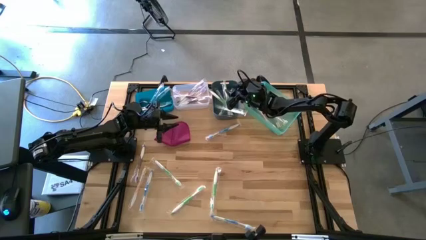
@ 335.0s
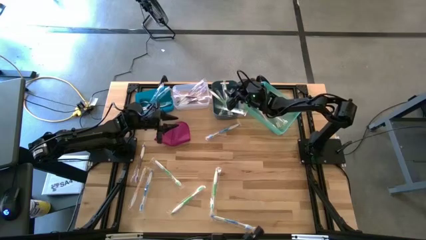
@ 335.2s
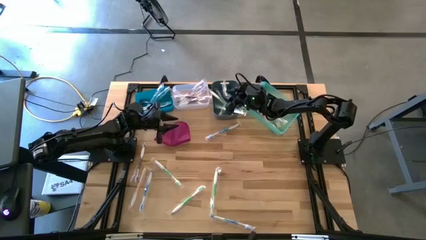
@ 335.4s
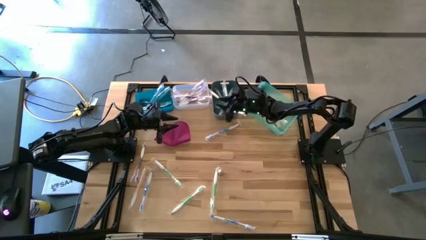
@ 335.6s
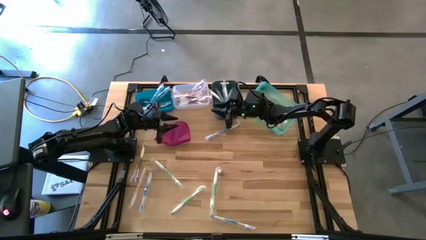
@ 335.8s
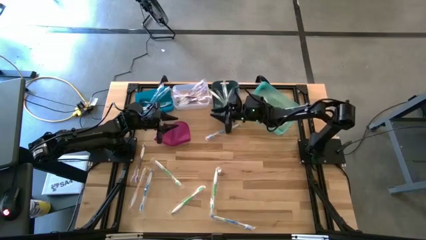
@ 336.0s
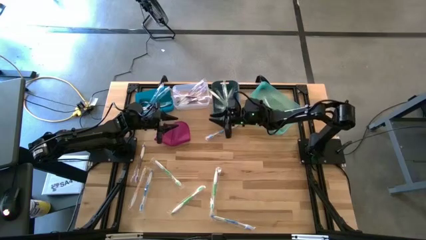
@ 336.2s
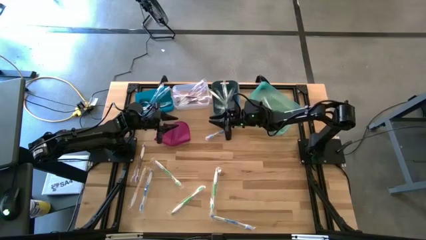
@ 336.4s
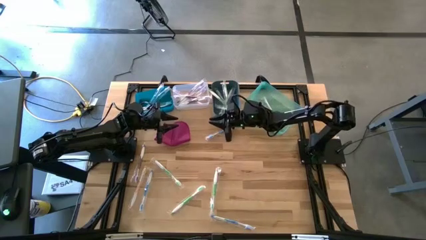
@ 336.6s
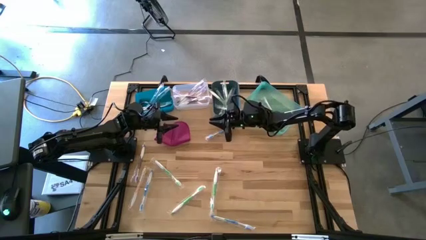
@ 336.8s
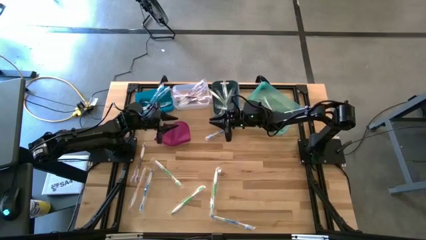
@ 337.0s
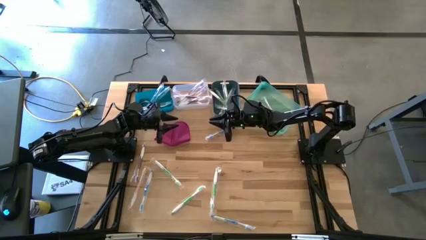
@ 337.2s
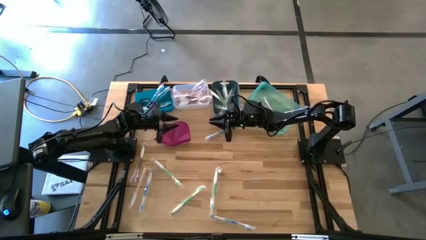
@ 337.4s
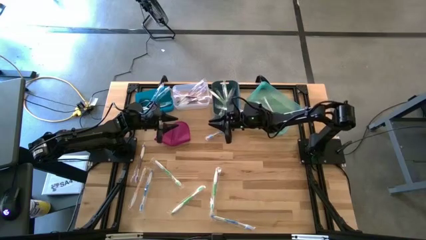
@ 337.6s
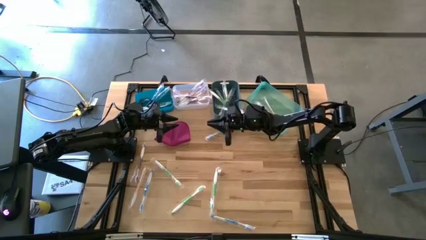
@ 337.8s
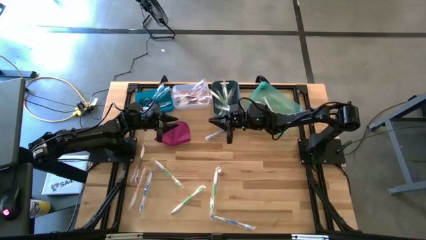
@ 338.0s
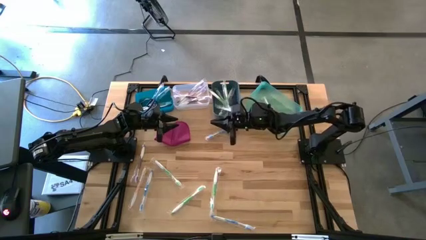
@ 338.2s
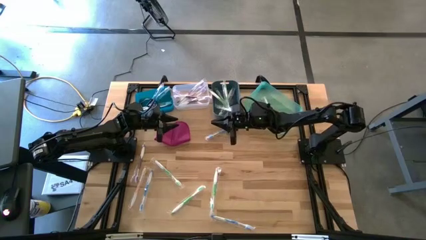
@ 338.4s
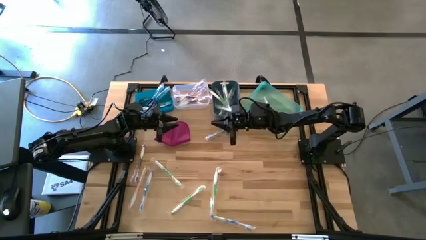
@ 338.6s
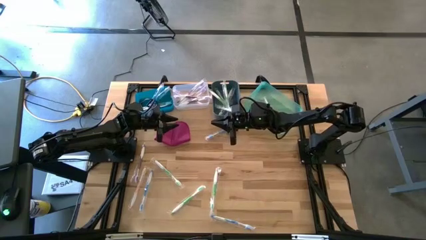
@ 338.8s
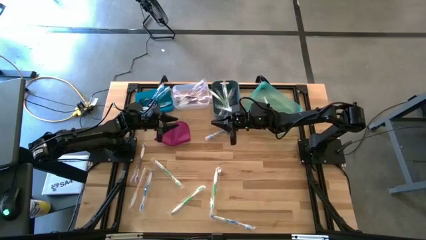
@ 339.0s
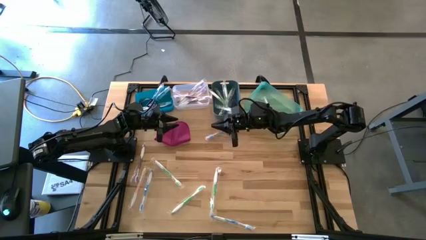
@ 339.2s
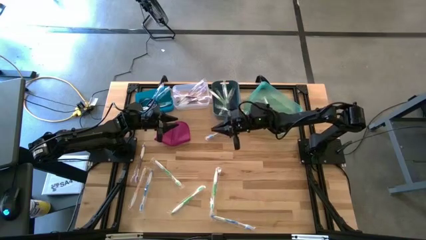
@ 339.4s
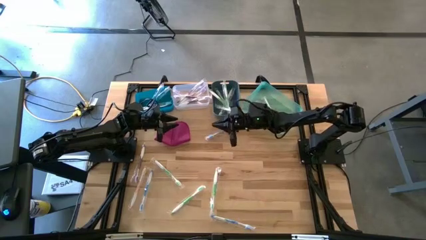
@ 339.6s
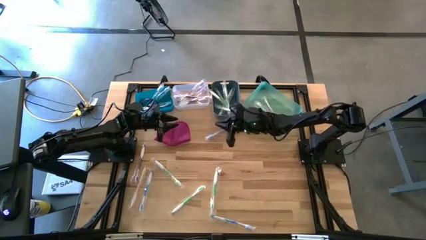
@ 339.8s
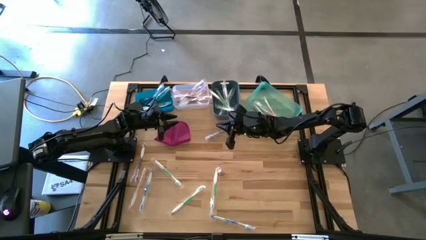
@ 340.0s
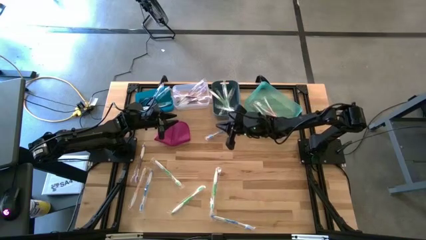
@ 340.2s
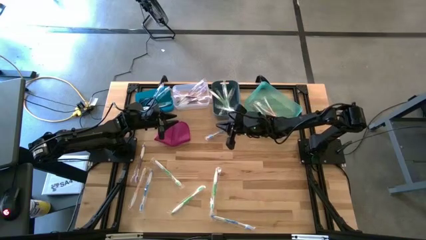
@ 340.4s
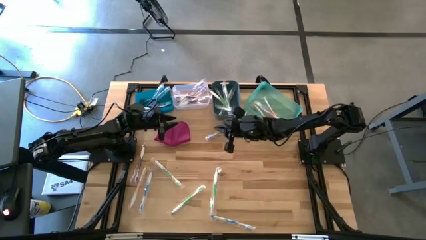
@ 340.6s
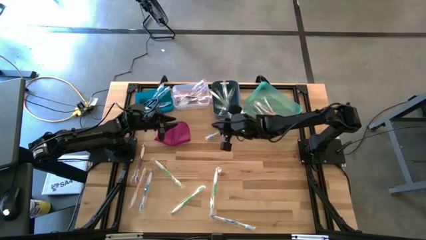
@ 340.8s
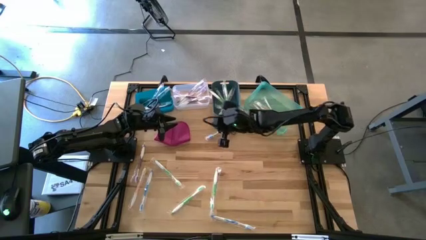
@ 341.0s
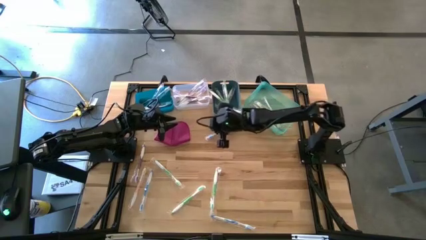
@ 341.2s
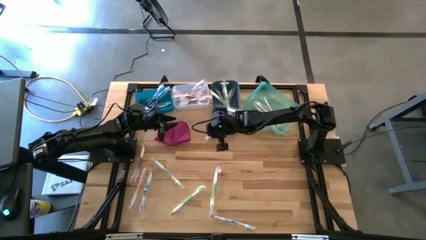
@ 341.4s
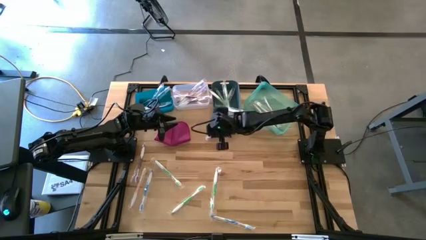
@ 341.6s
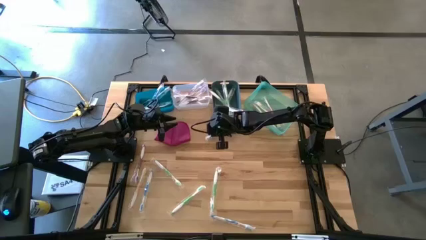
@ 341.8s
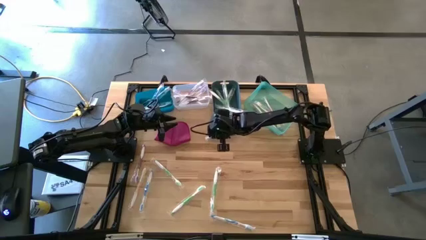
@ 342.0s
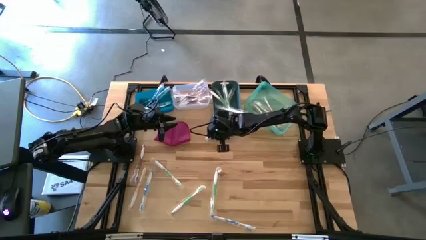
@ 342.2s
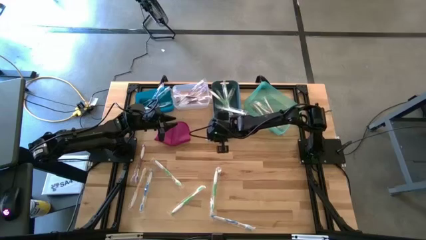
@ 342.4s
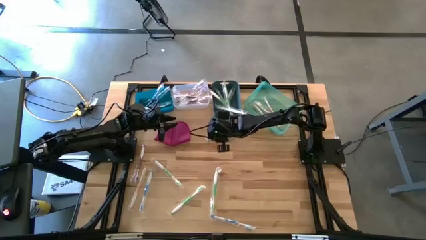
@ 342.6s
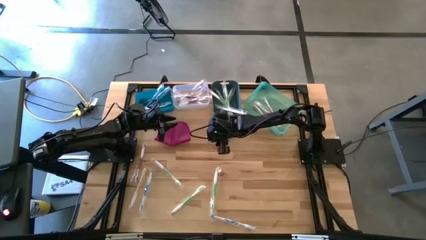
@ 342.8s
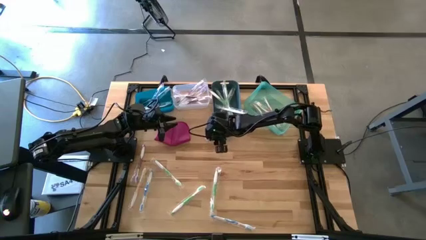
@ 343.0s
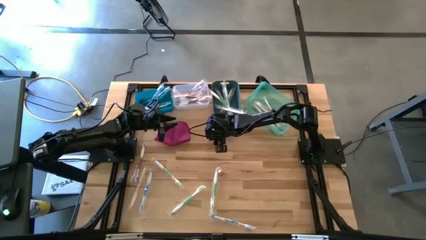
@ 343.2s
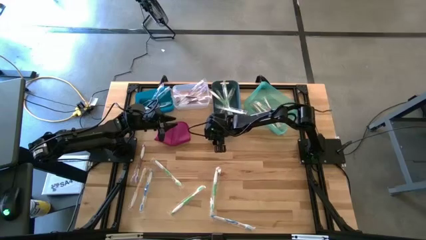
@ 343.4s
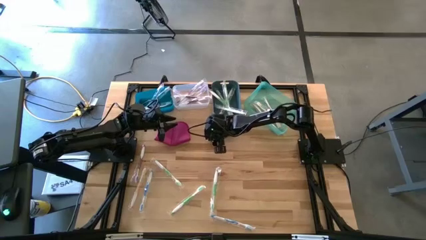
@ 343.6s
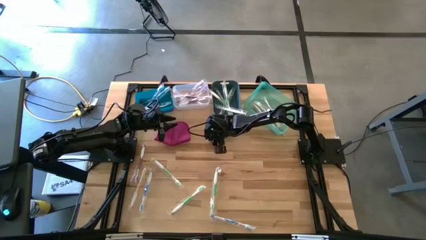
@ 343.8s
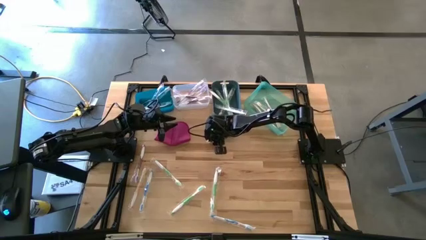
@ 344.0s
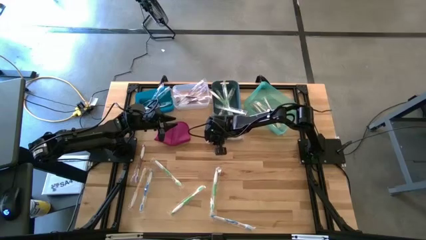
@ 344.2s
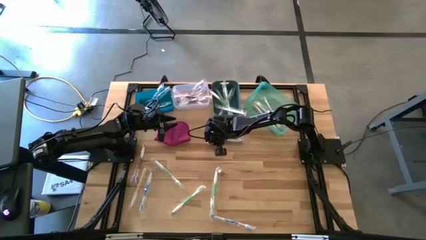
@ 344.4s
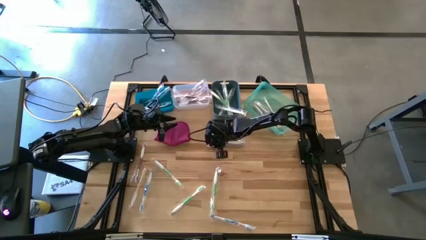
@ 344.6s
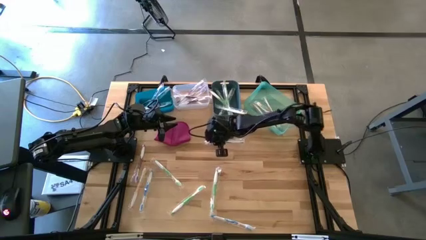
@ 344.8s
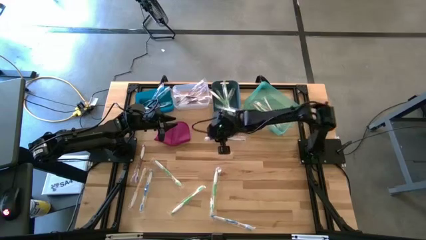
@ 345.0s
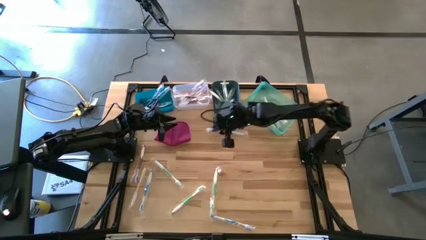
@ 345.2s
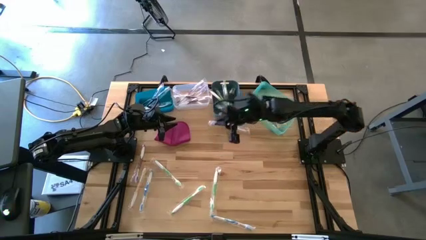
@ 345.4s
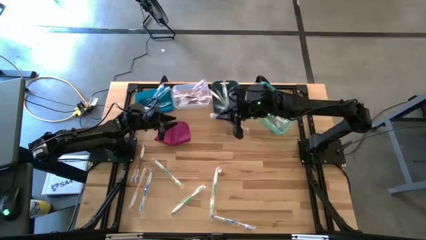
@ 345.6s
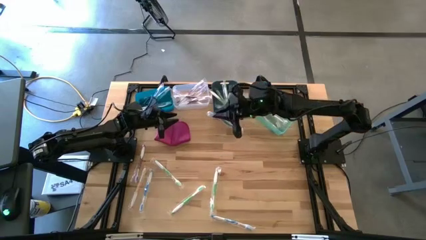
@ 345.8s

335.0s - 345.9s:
Task: Pick & Place Toothbrushes
Put the blue toothbrush into the blue bin

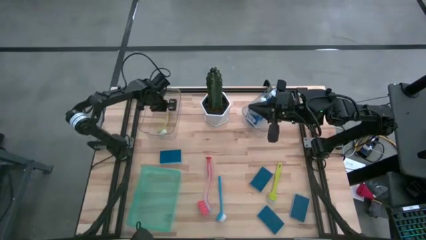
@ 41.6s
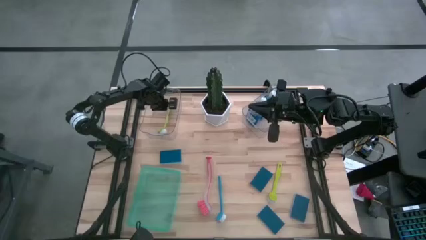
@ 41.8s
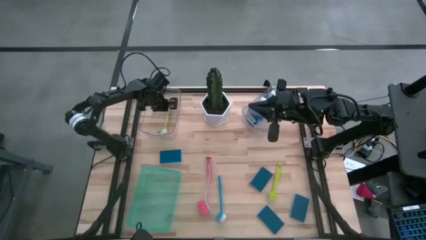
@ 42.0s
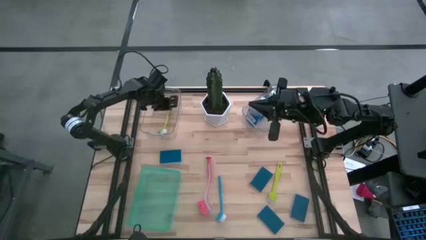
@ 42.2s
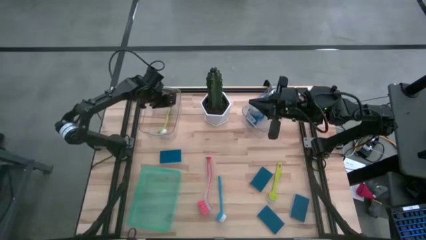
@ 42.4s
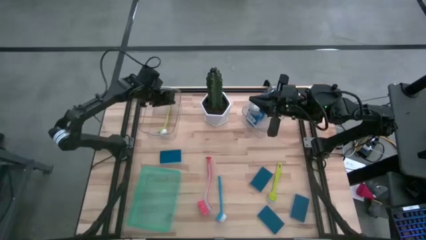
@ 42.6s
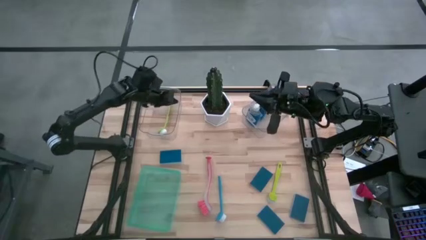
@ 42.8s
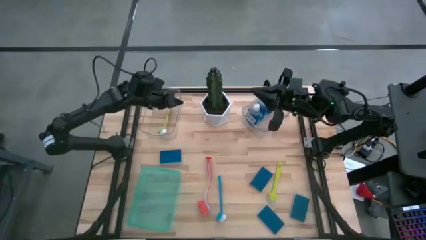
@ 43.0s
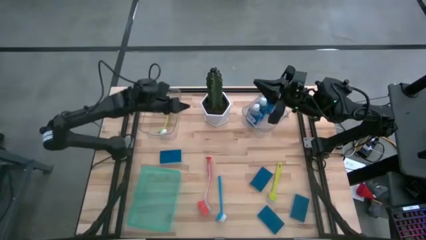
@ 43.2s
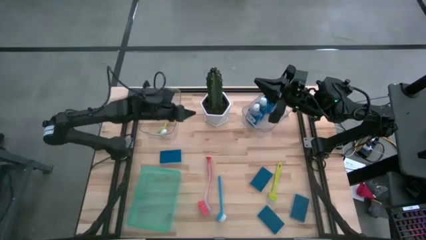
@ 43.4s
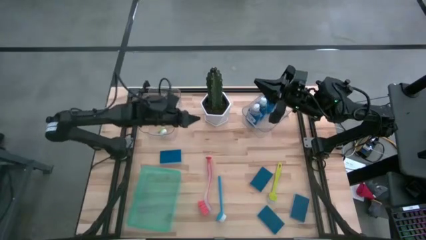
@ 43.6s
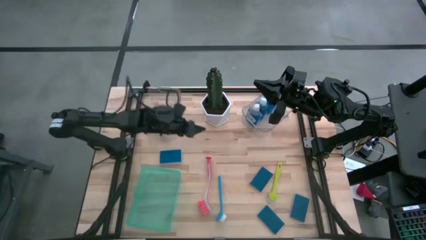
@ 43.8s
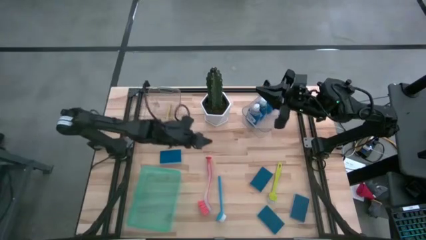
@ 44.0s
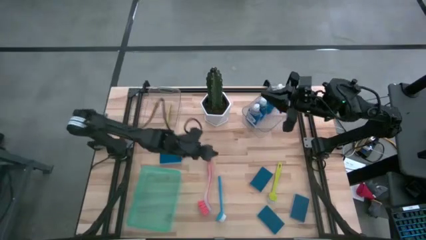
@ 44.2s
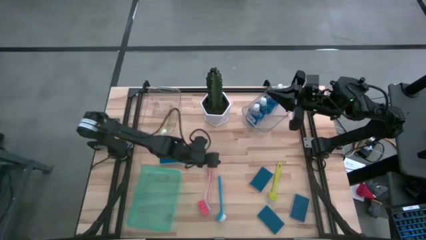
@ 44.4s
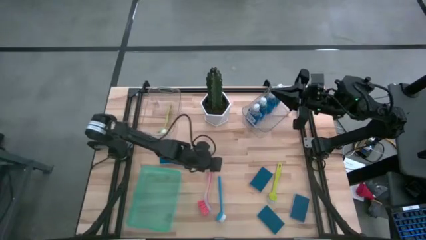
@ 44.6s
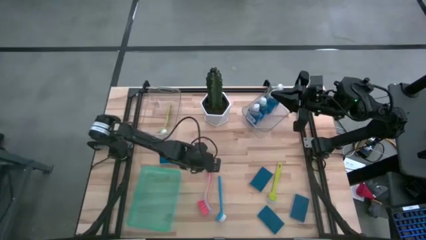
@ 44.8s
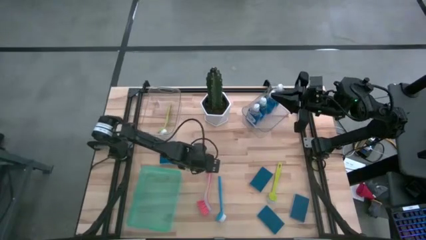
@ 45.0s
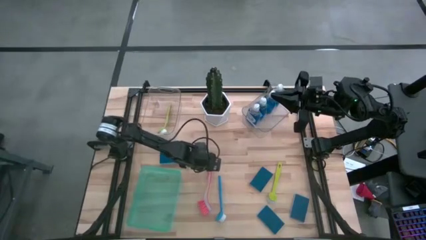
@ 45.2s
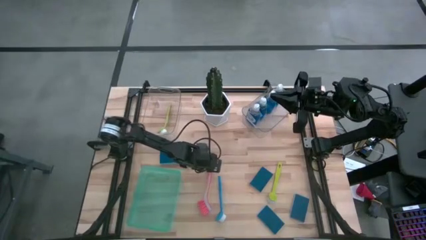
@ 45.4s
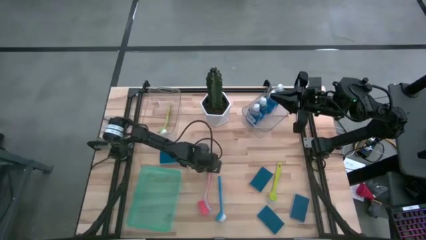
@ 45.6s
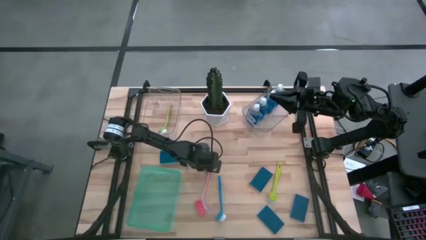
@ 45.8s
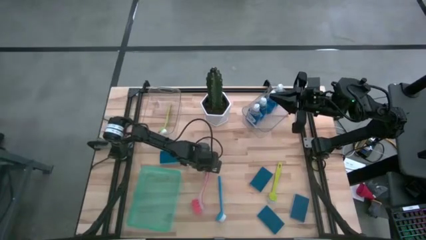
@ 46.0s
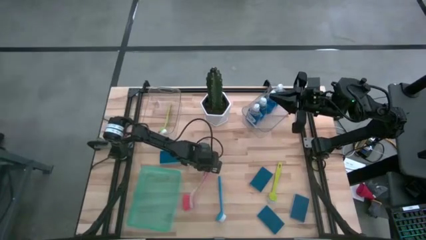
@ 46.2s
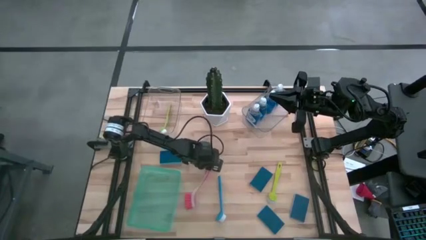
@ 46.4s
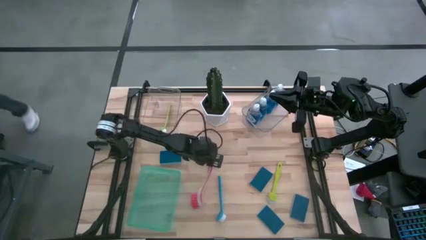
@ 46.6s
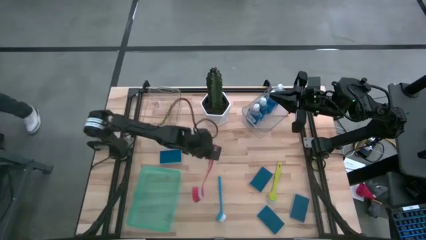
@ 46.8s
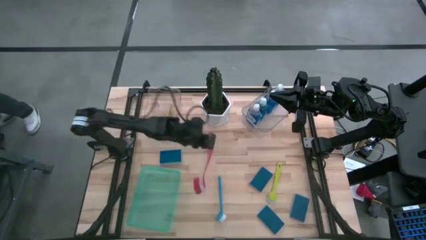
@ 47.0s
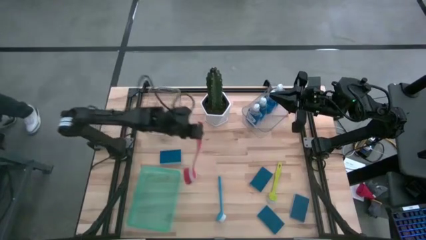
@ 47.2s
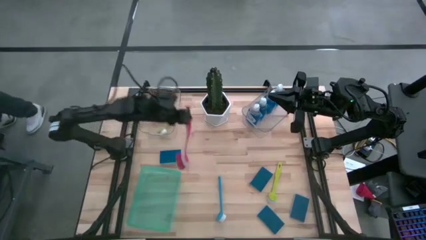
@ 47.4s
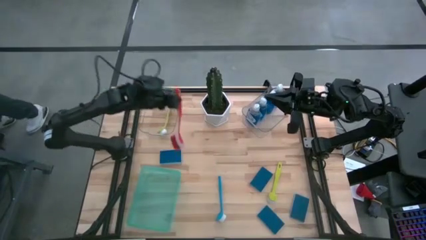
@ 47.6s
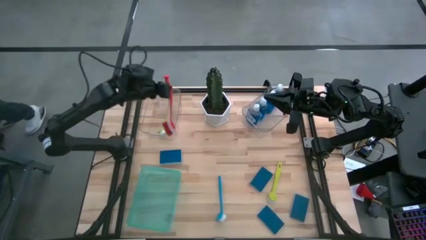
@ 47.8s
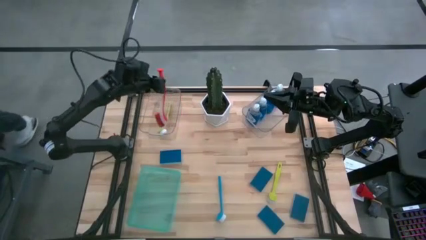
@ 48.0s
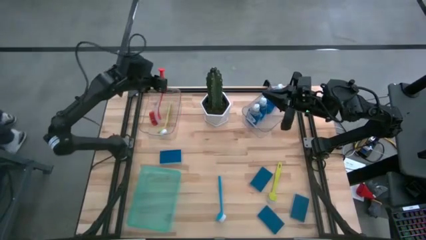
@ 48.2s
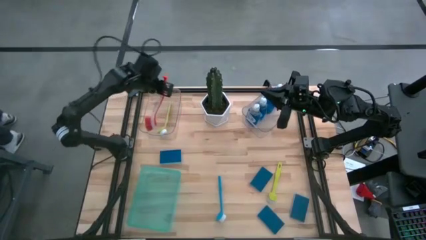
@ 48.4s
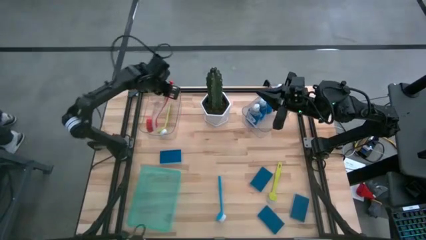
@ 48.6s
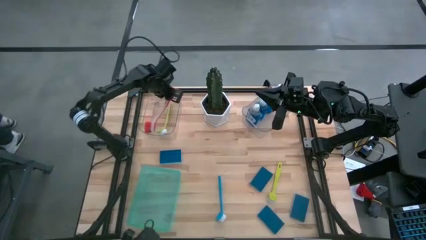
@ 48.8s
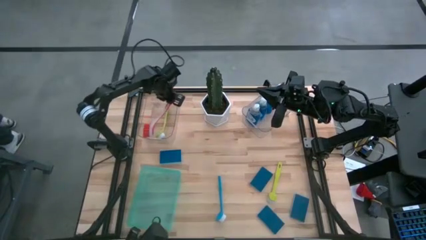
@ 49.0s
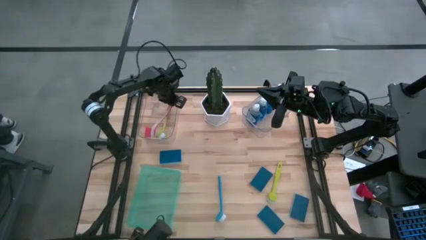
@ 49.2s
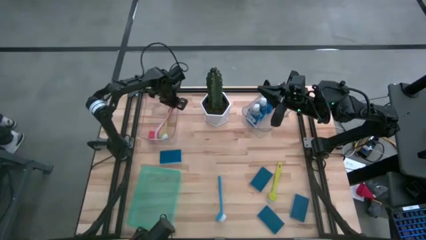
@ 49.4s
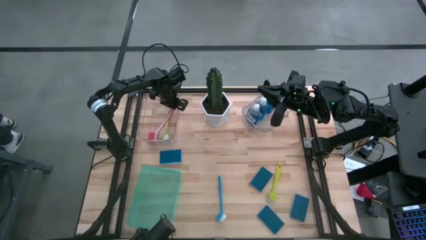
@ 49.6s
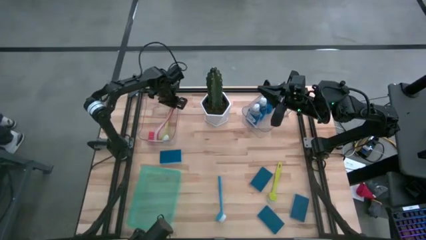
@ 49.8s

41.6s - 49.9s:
Task: Pick & Place Kitchen Sink Supplies
Put the red dish brush into the left transparent bin
